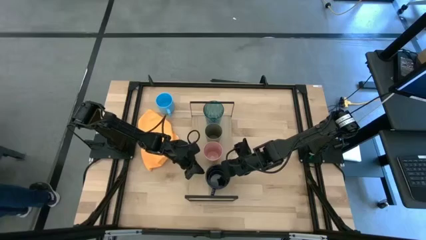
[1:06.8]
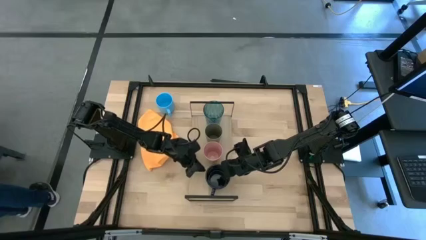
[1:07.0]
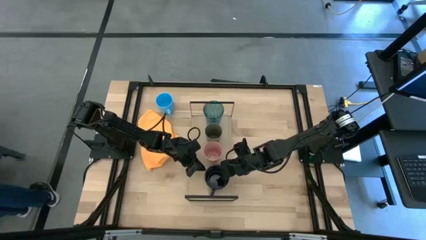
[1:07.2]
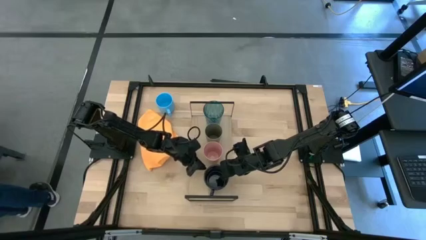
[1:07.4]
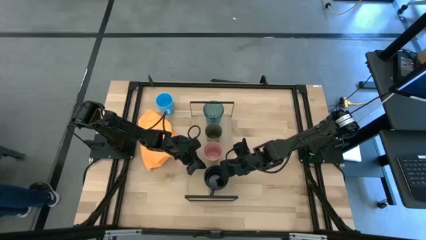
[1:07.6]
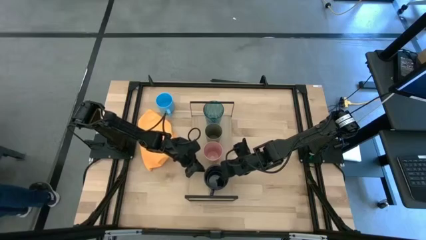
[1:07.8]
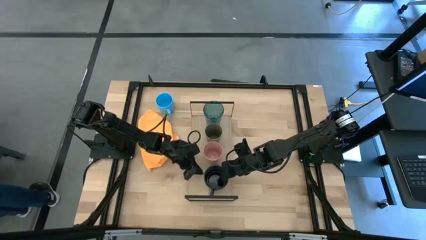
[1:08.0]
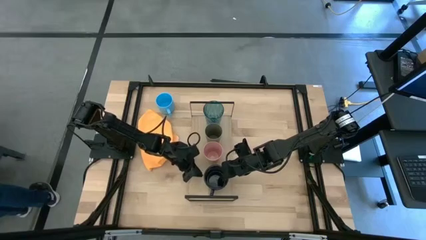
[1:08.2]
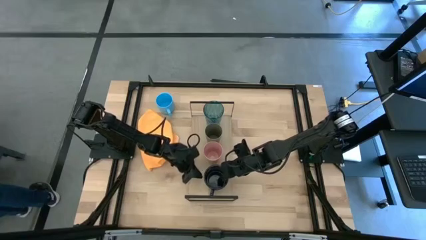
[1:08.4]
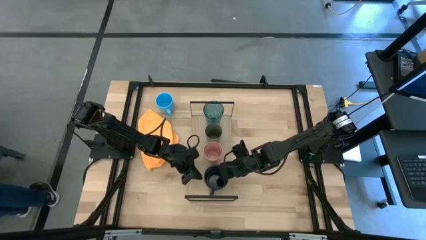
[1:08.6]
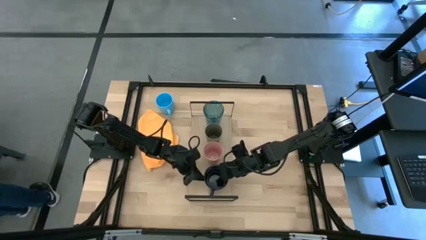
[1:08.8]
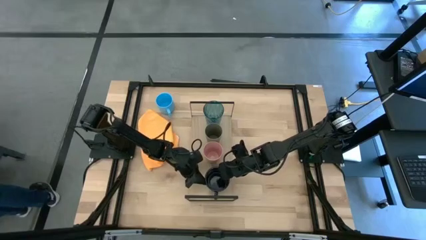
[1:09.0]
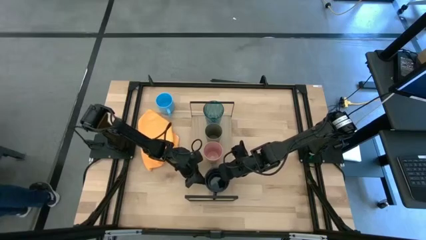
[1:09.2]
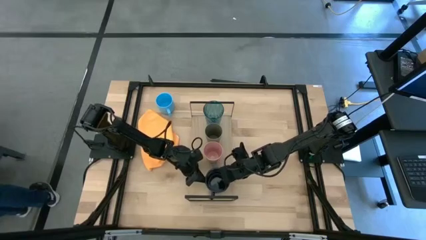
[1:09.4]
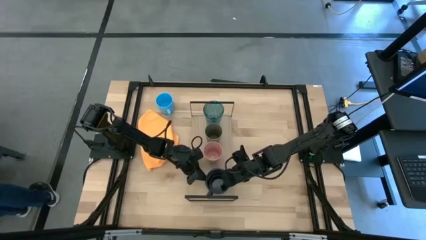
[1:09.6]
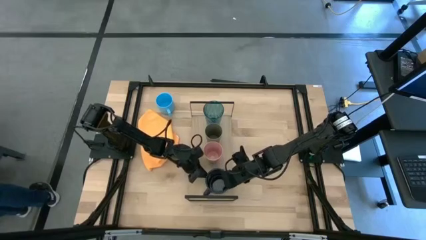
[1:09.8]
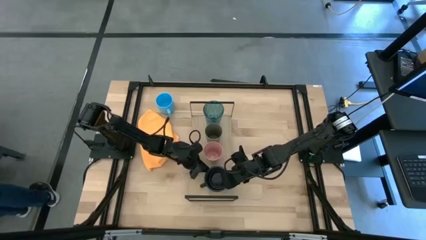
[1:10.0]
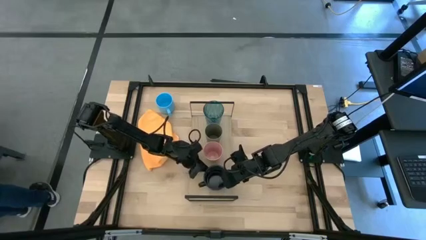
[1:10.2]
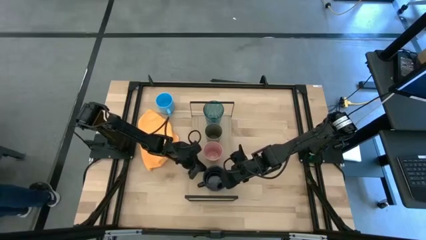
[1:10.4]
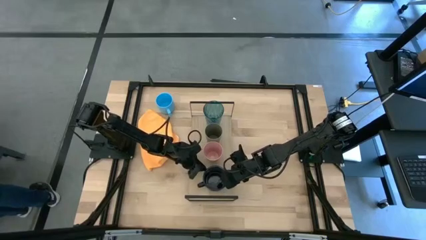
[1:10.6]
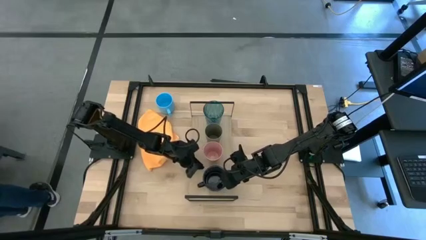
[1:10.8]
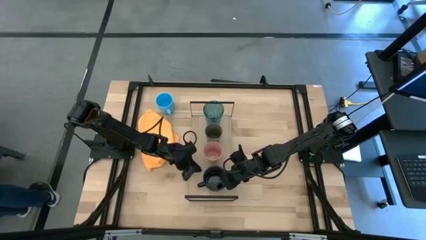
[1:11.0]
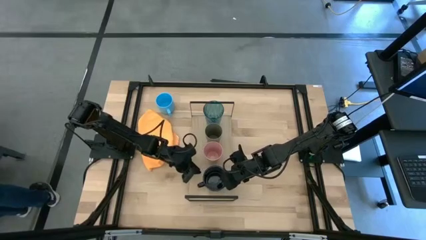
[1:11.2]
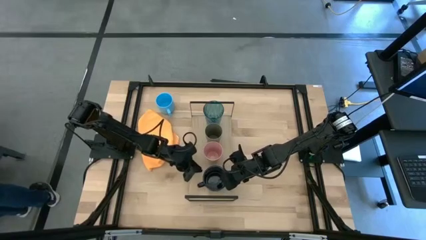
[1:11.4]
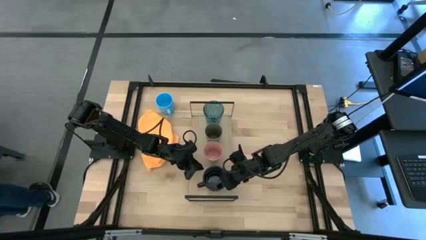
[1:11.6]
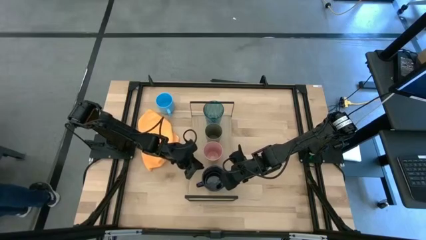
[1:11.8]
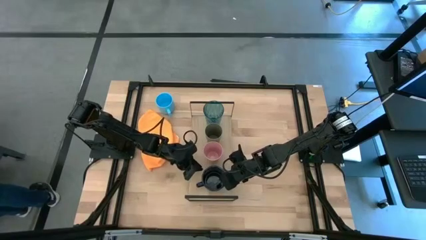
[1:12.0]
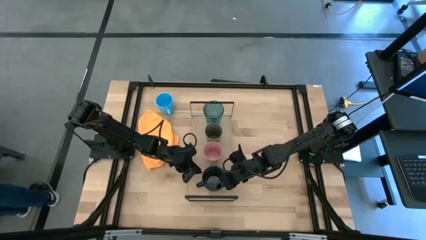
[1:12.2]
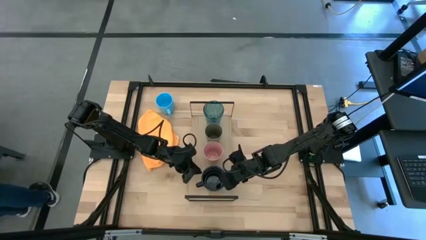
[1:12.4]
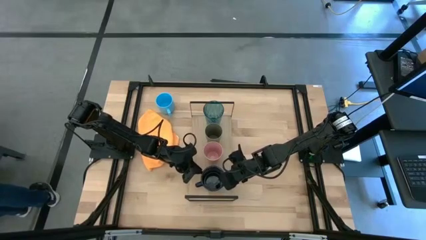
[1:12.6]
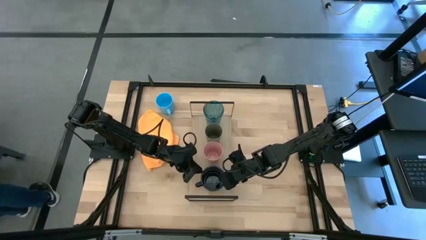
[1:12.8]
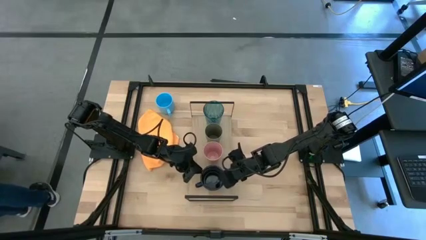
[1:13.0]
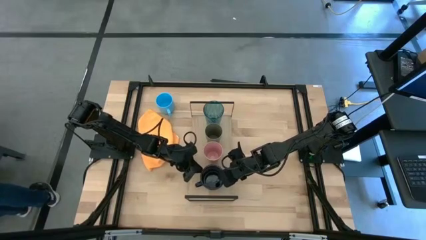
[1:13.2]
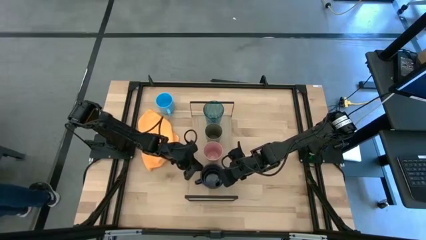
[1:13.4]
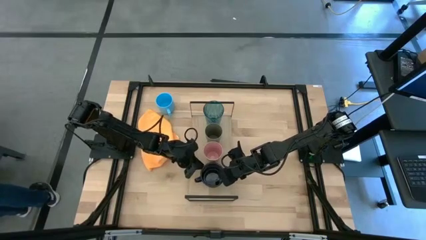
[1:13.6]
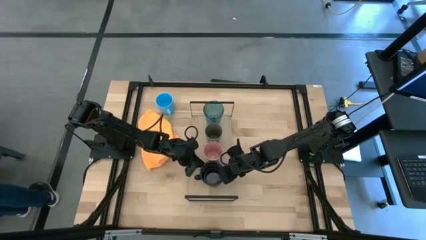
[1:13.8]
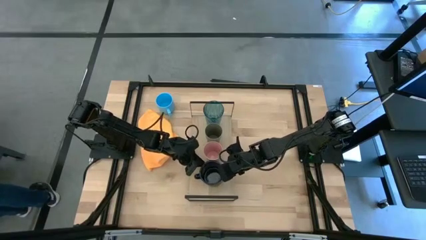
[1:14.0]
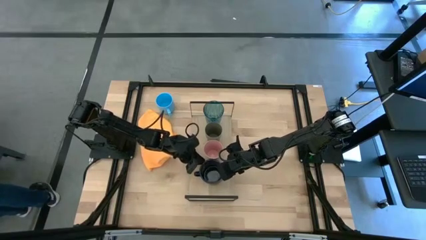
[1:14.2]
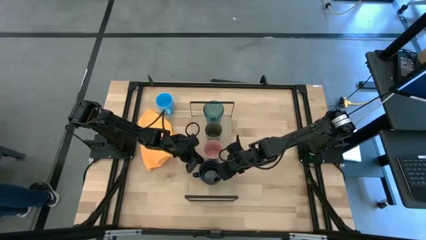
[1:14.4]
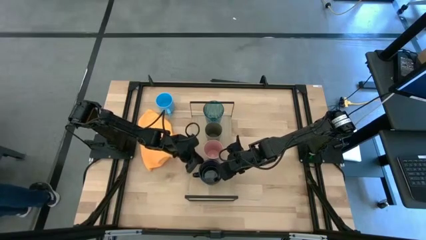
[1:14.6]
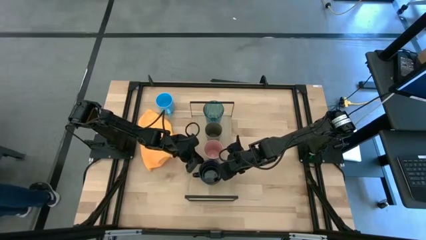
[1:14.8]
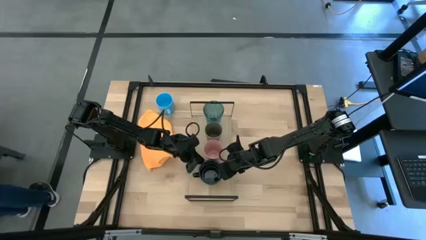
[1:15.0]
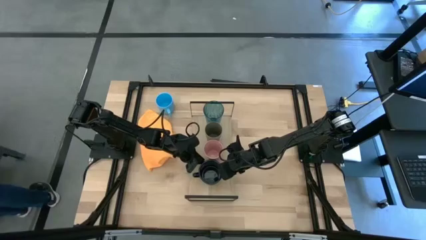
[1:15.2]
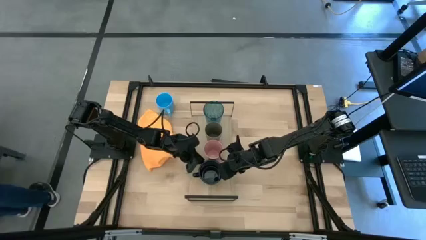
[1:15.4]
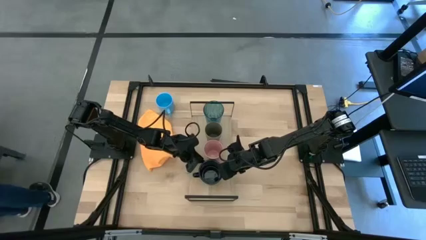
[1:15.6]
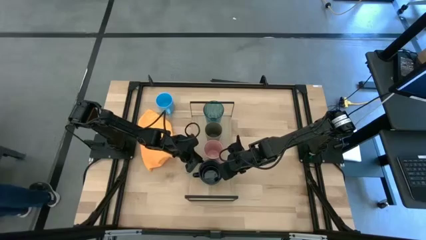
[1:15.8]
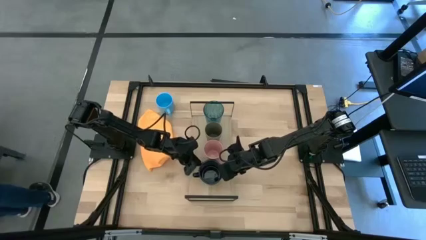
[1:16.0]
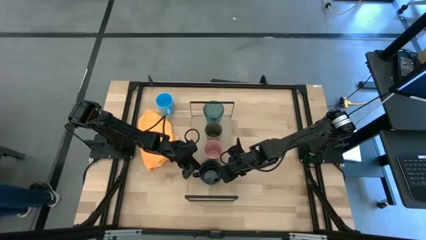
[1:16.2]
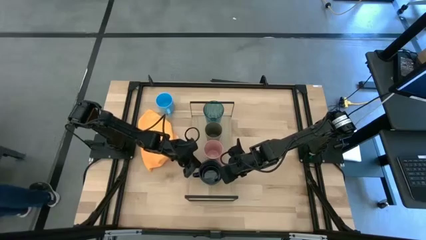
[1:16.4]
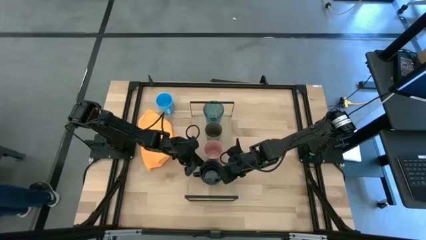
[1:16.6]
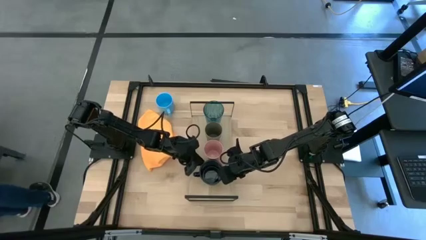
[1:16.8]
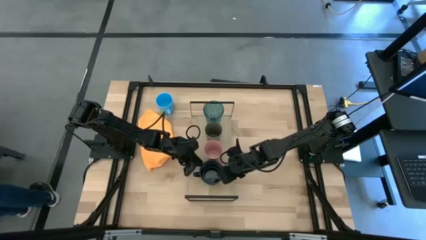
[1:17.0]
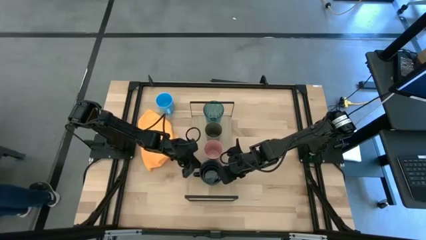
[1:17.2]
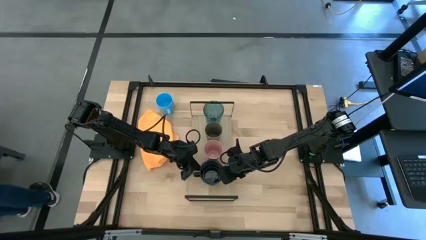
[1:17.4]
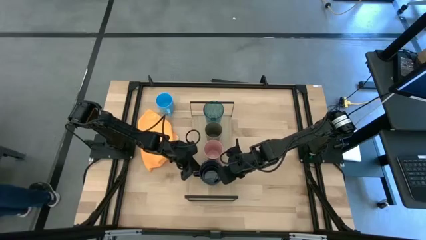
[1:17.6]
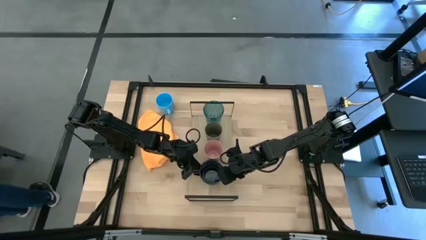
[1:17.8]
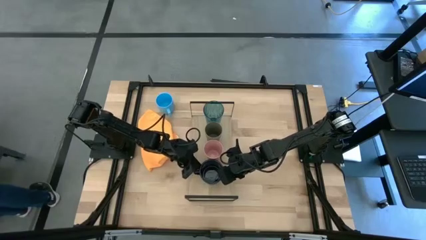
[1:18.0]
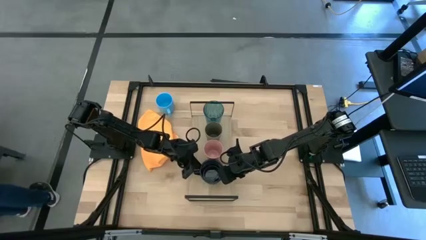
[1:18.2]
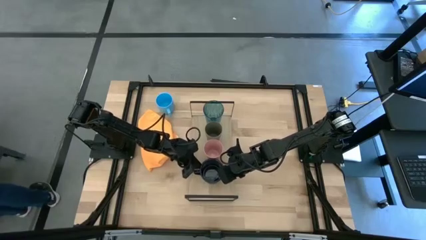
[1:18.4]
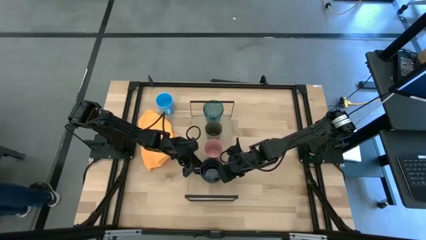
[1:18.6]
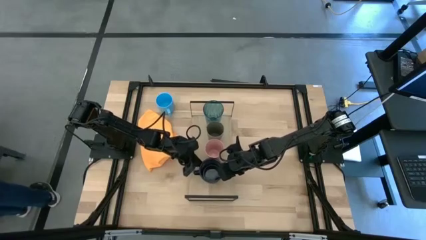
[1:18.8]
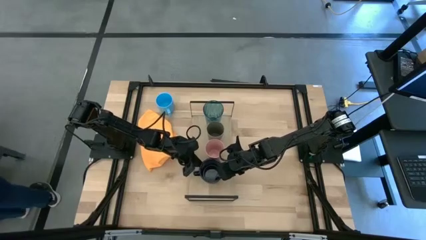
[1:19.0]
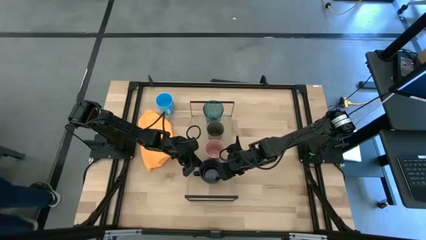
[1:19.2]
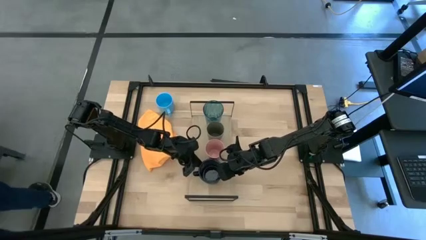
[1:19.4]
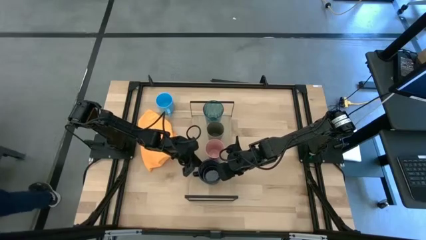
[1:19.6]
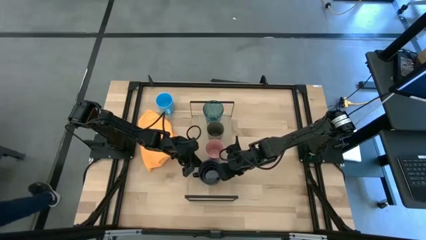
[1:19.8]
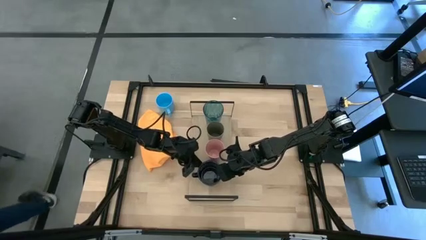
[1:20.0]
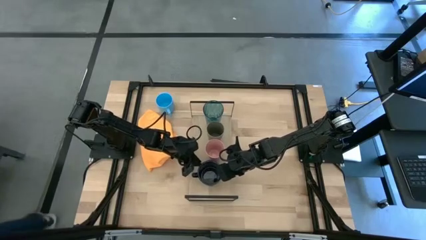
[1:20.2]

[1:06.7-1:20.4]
Task: Stack small to large cups/mugs on shelf
Put the dark blue mug on the shelf

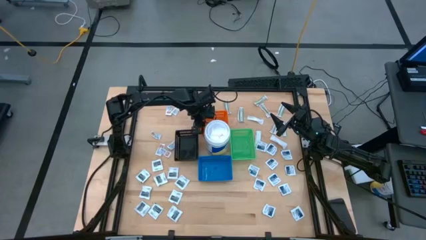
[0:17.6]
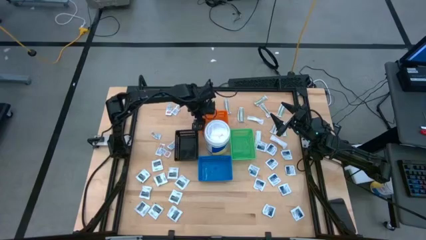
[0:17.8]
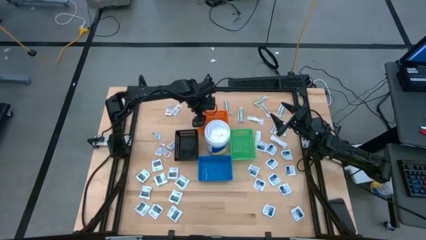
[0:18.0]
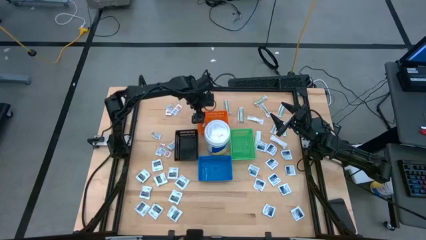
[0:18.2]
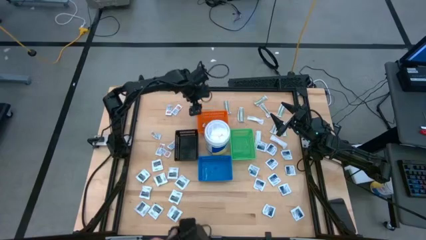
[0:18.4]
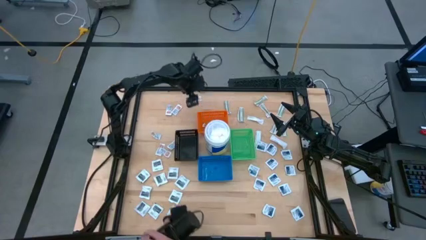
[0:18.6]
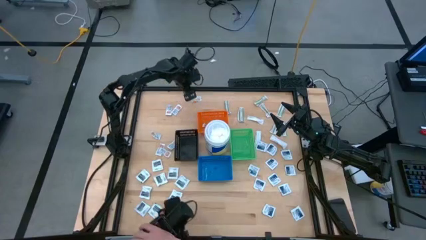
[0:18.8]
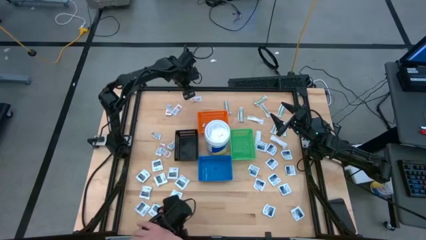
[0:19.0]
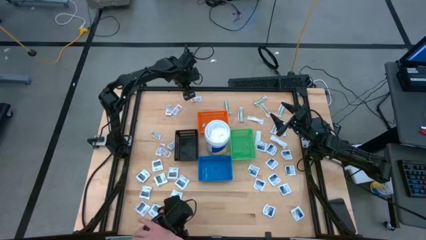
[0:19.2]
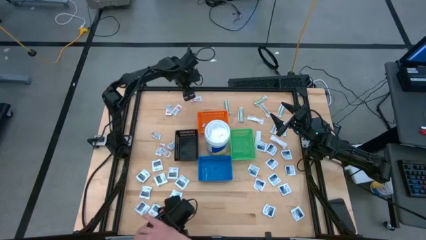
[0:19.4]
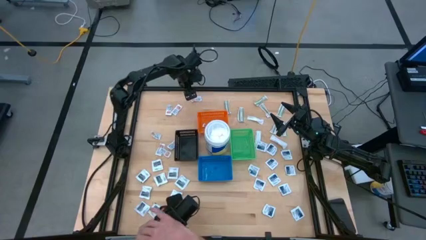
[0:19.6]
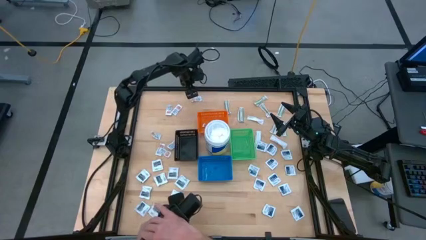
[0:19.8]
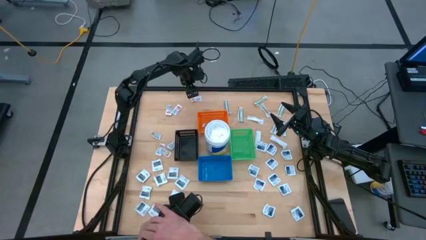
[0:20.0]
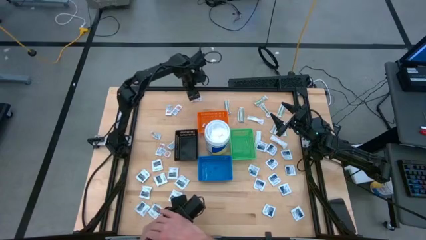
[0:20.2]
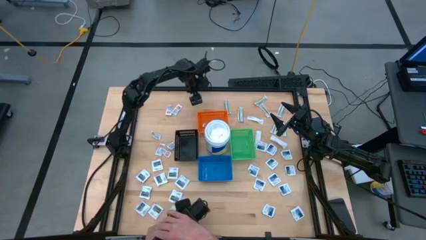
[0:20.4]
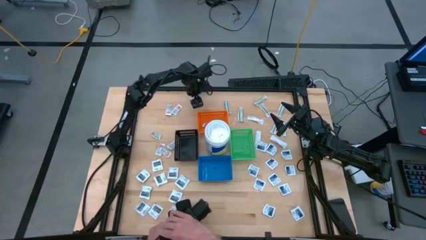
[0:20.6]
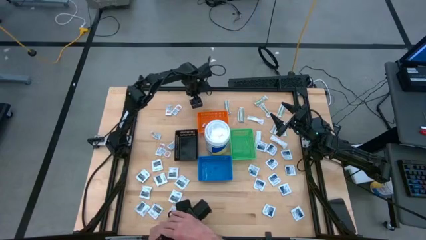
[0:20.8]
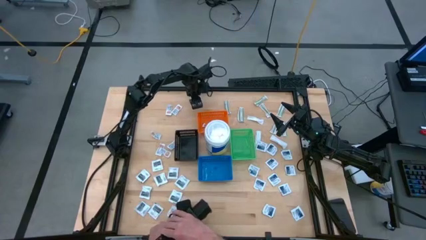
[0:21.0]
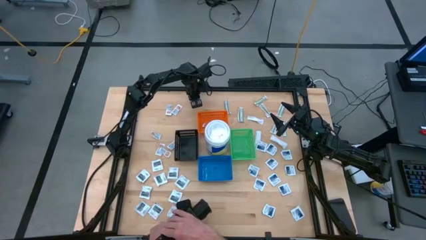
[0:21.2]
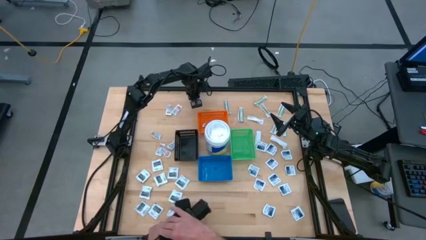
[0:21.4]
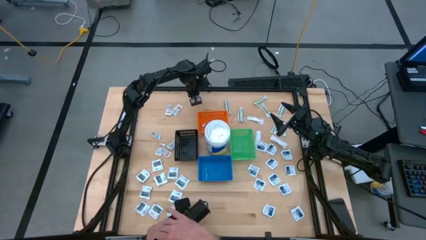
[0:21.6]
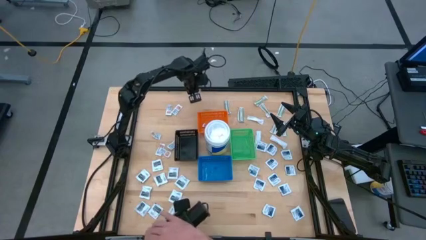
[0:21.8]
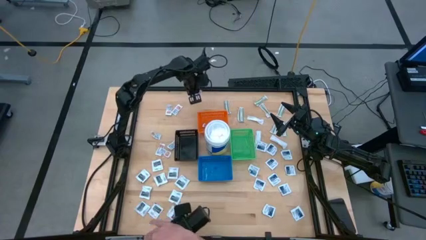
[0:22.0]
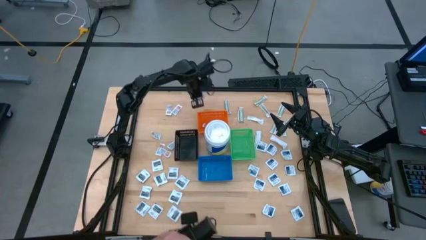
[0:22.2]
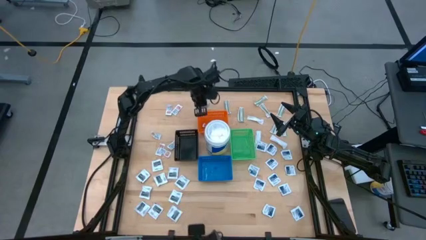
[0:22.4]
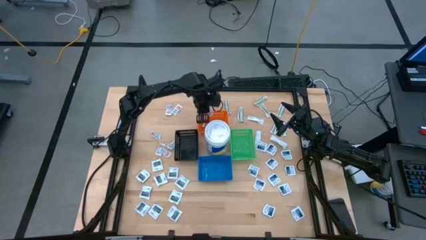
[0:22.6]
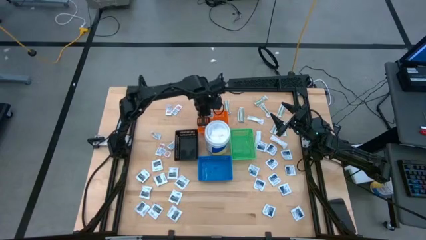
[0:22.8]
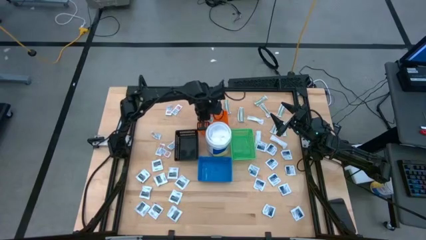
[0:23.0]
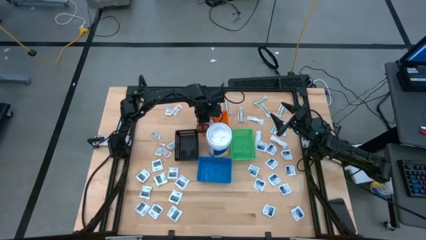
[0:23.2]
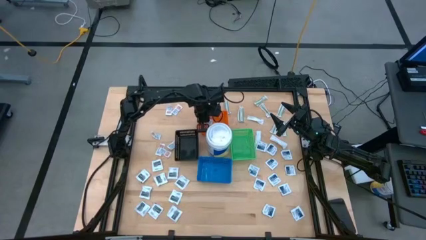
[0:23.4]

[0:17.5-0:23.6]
Task: Pick & Place First Aid Supplies
Put the orange ointment pack into the orange bin
